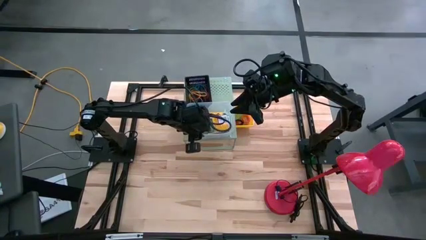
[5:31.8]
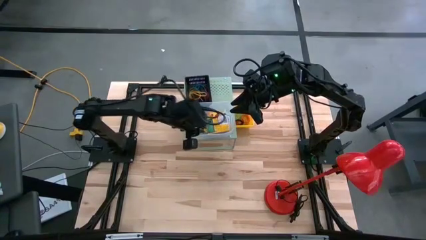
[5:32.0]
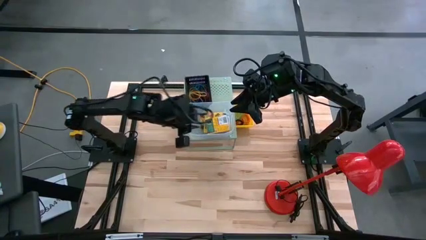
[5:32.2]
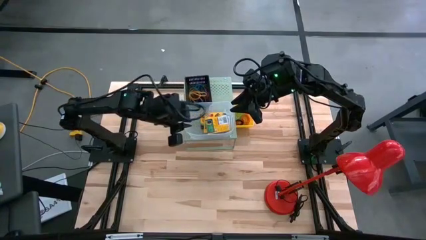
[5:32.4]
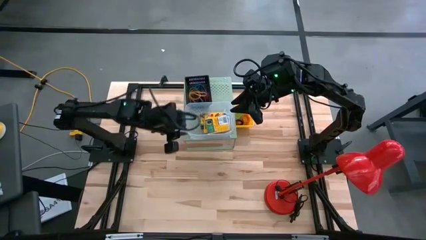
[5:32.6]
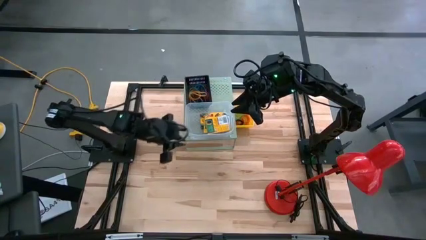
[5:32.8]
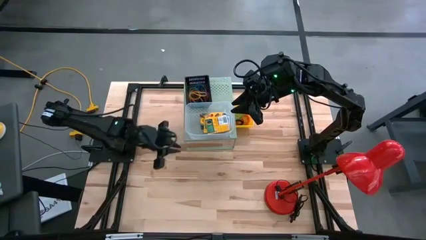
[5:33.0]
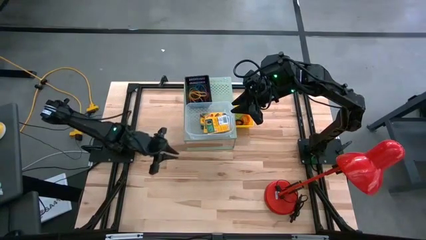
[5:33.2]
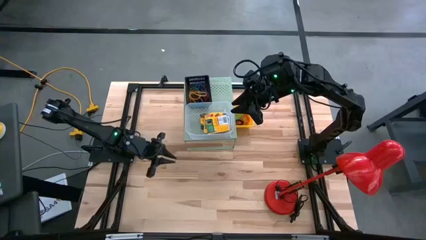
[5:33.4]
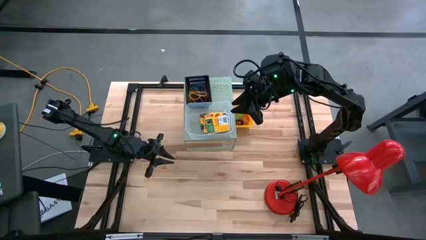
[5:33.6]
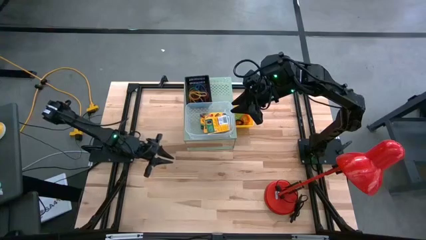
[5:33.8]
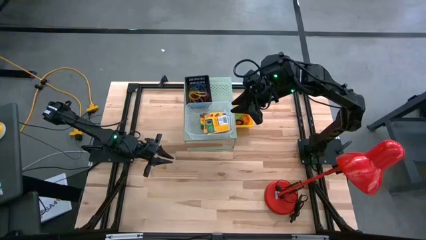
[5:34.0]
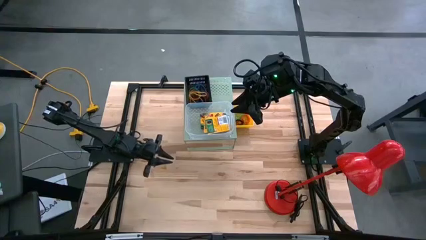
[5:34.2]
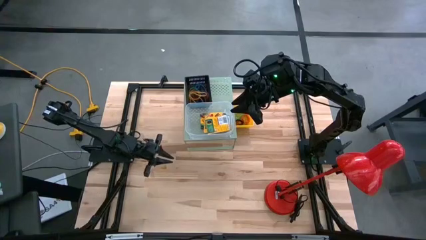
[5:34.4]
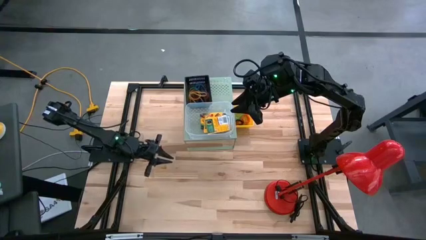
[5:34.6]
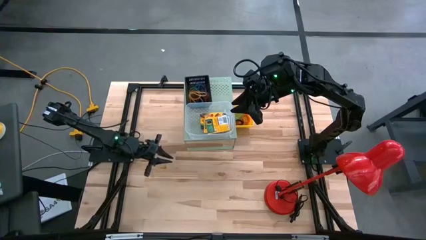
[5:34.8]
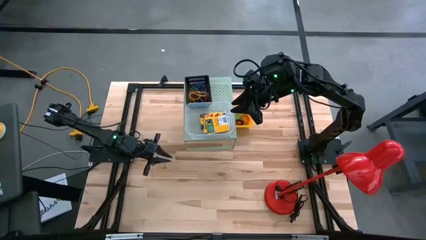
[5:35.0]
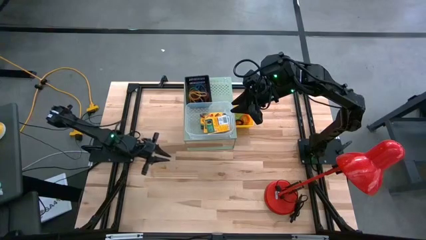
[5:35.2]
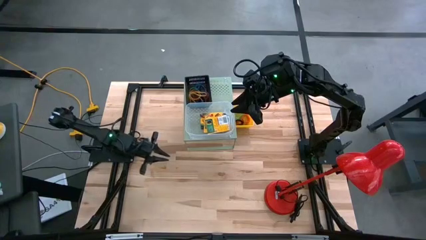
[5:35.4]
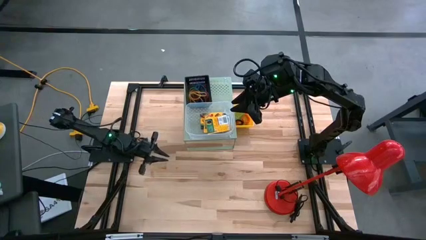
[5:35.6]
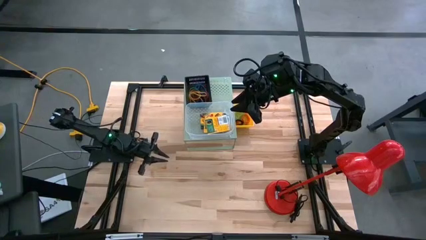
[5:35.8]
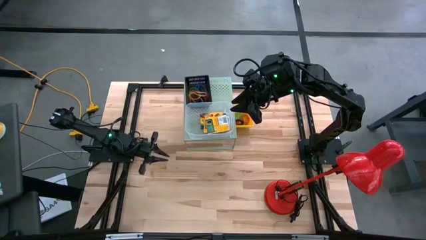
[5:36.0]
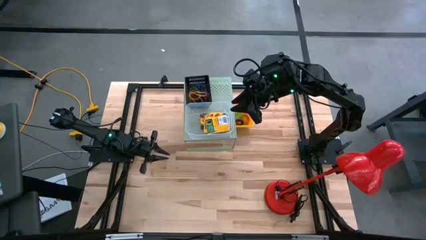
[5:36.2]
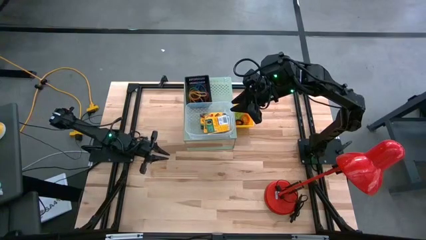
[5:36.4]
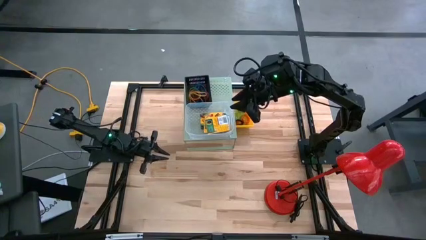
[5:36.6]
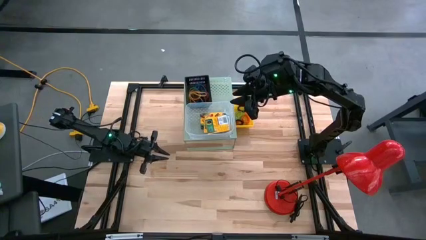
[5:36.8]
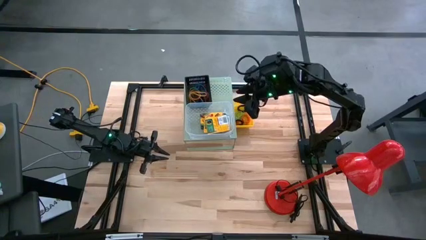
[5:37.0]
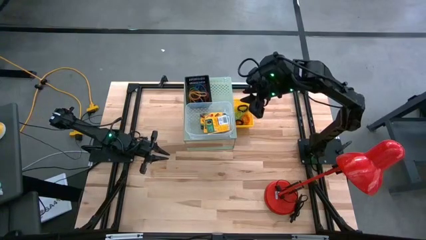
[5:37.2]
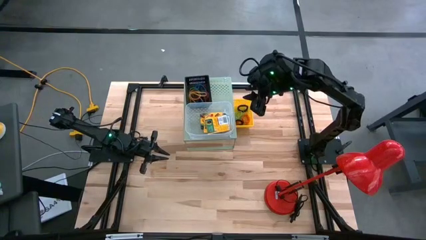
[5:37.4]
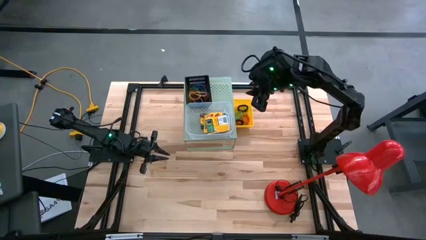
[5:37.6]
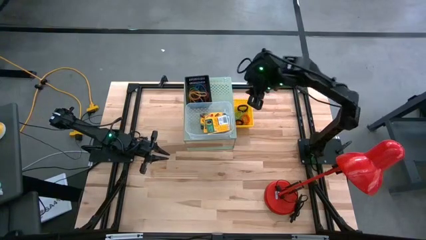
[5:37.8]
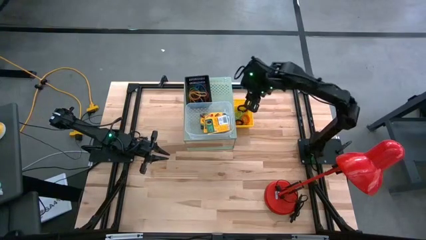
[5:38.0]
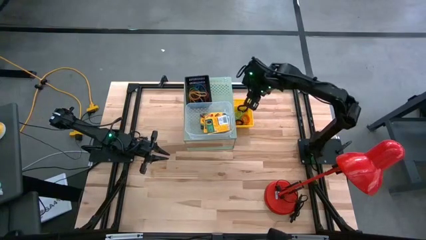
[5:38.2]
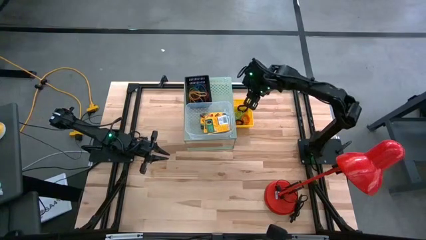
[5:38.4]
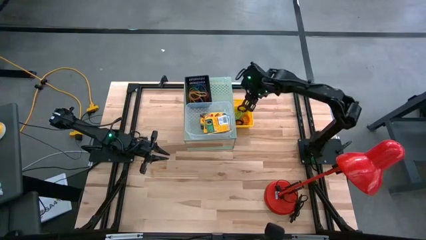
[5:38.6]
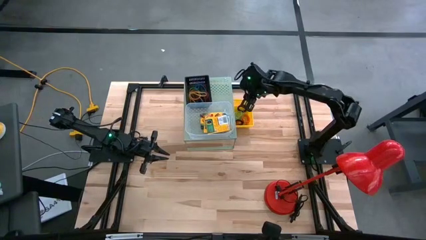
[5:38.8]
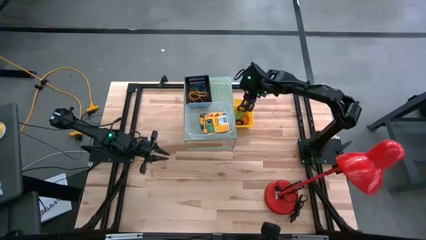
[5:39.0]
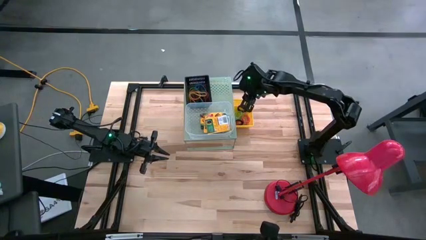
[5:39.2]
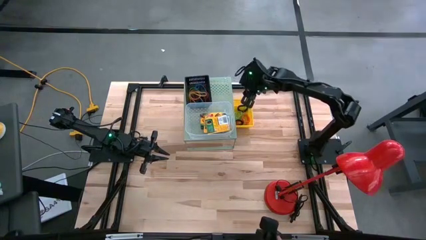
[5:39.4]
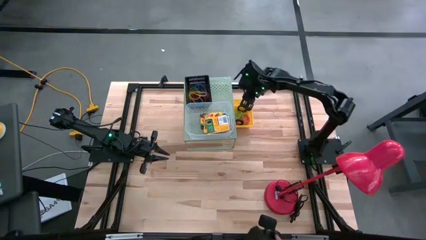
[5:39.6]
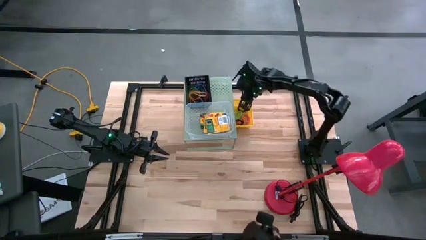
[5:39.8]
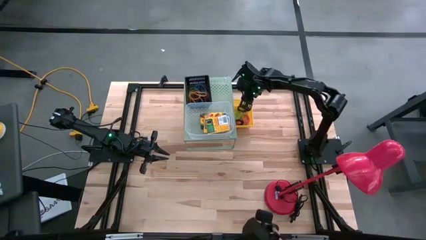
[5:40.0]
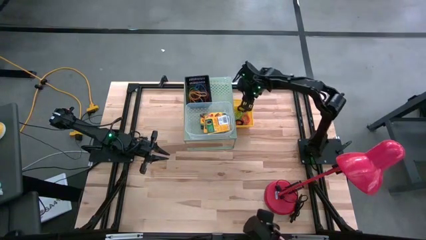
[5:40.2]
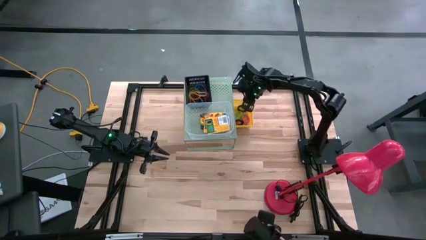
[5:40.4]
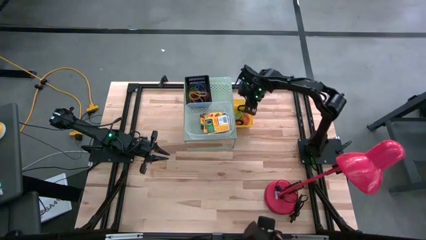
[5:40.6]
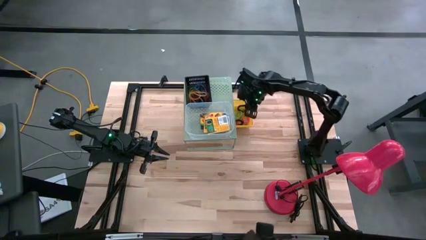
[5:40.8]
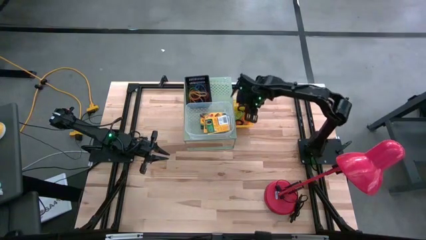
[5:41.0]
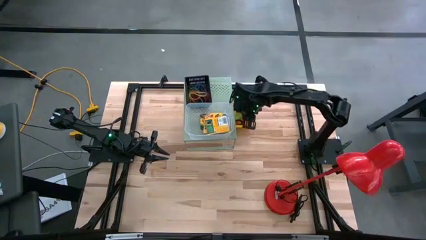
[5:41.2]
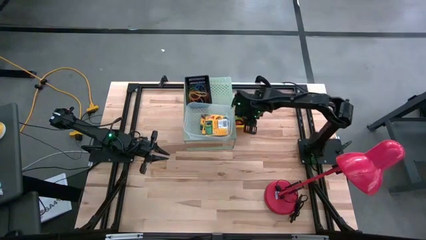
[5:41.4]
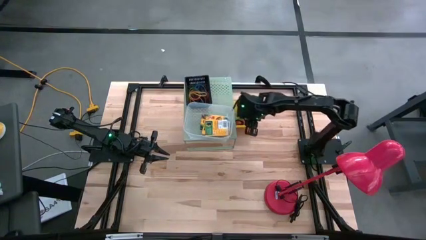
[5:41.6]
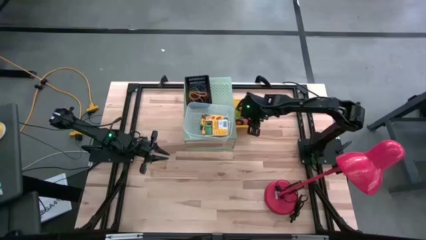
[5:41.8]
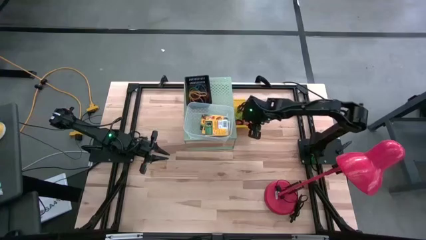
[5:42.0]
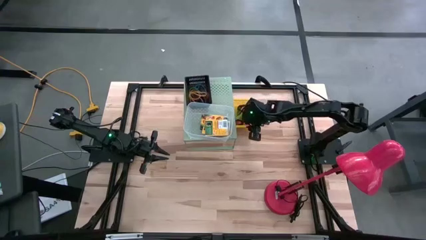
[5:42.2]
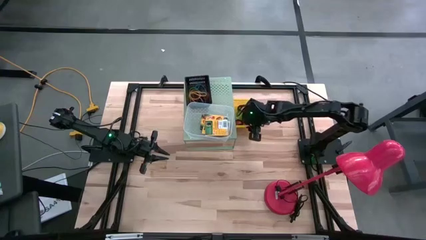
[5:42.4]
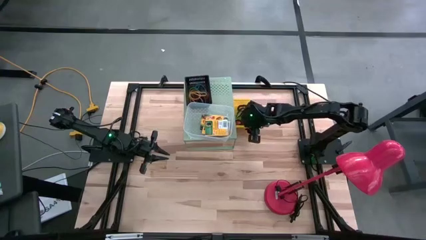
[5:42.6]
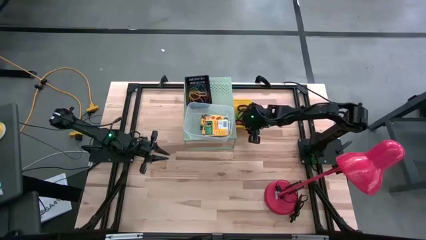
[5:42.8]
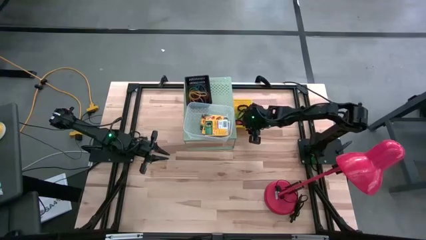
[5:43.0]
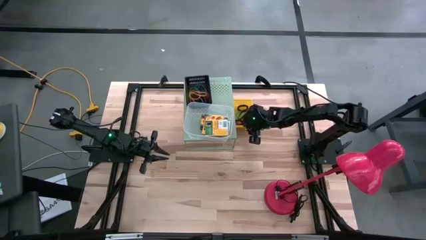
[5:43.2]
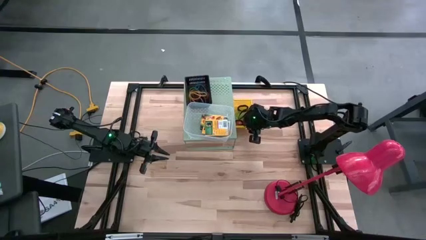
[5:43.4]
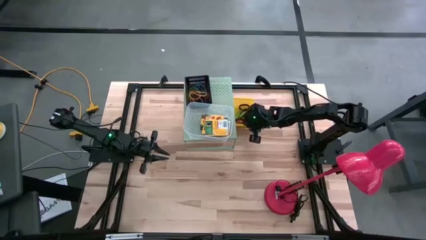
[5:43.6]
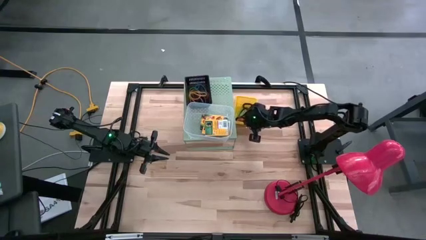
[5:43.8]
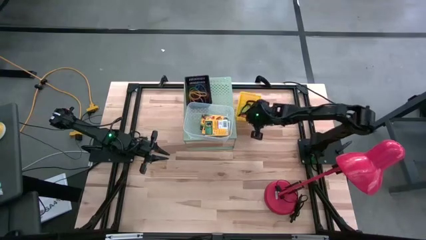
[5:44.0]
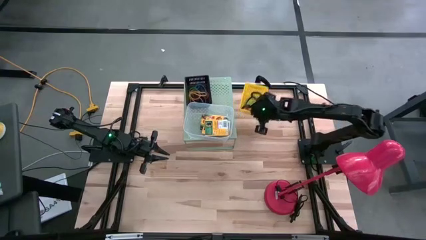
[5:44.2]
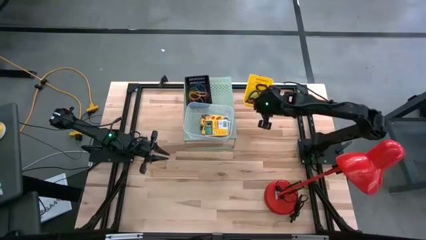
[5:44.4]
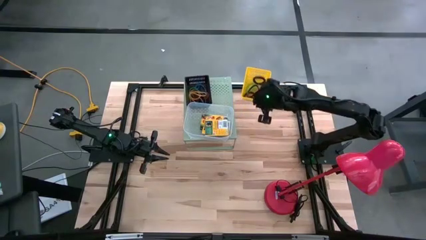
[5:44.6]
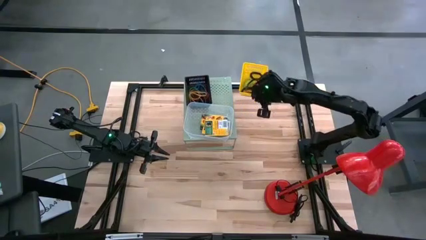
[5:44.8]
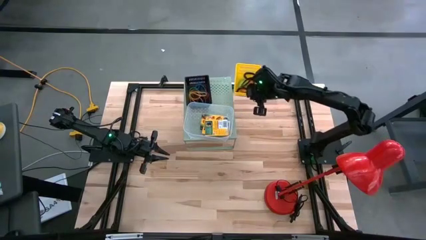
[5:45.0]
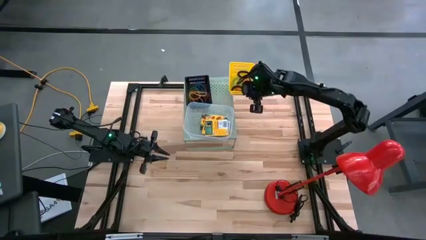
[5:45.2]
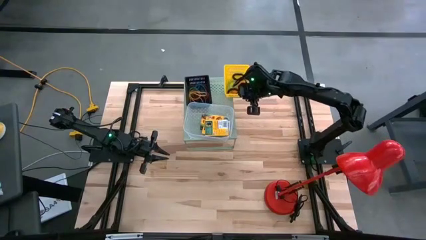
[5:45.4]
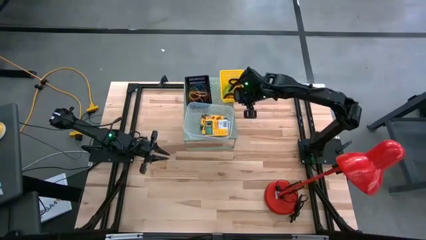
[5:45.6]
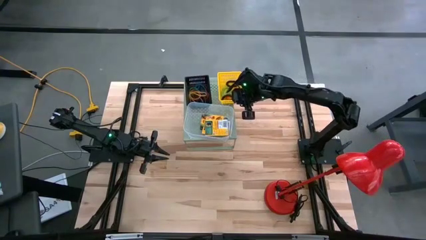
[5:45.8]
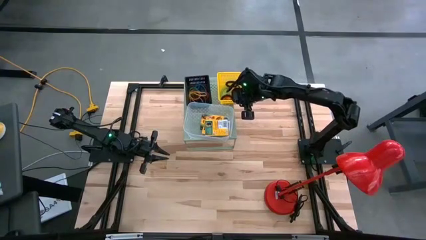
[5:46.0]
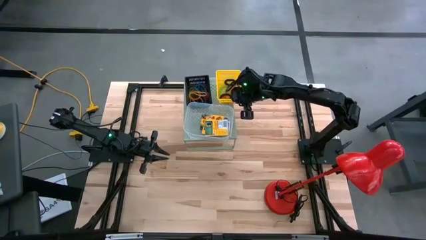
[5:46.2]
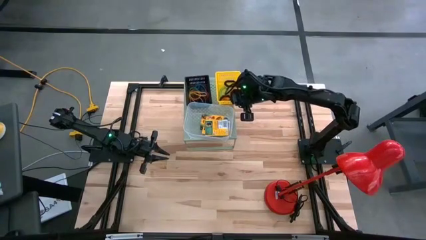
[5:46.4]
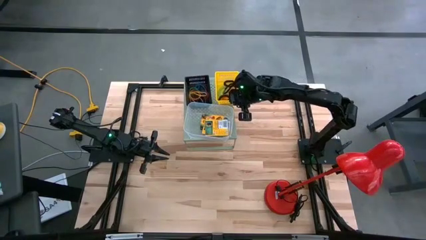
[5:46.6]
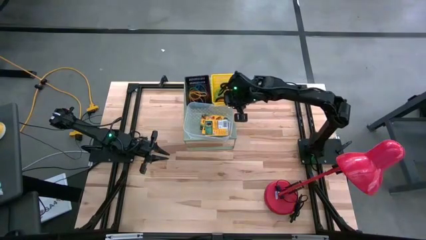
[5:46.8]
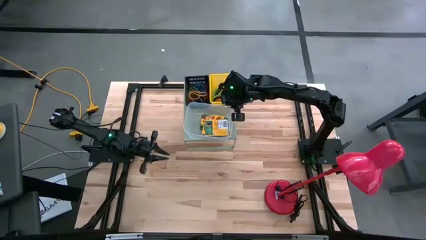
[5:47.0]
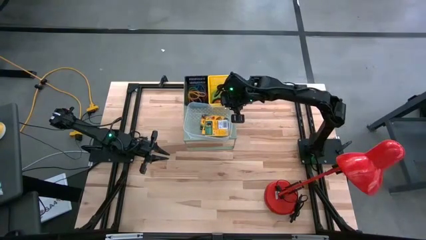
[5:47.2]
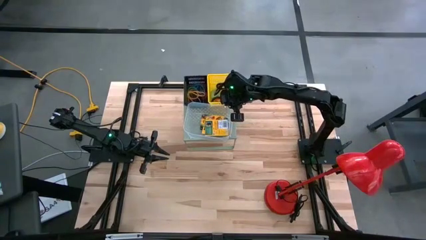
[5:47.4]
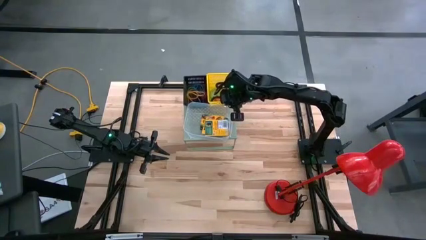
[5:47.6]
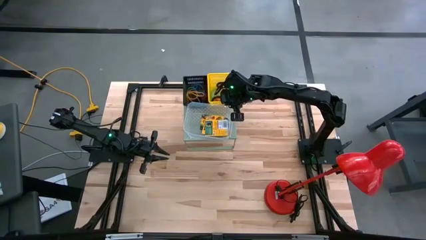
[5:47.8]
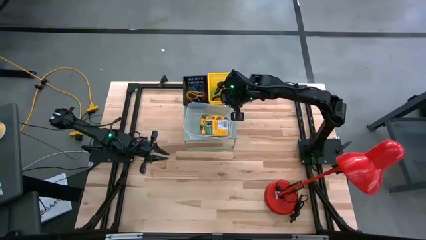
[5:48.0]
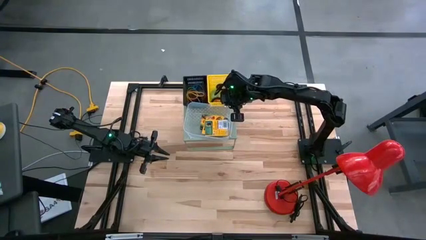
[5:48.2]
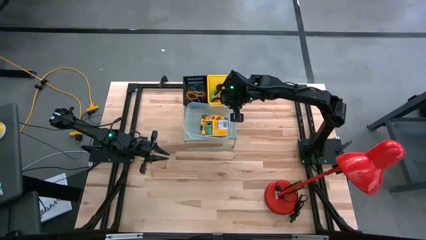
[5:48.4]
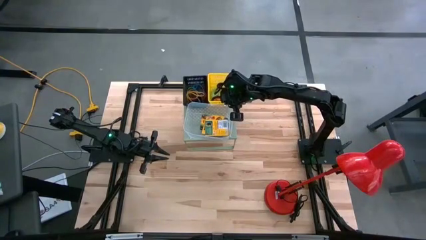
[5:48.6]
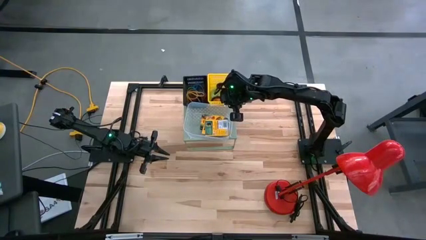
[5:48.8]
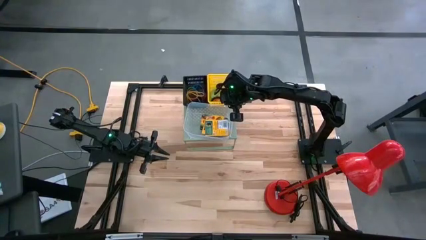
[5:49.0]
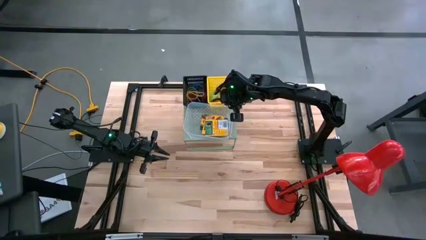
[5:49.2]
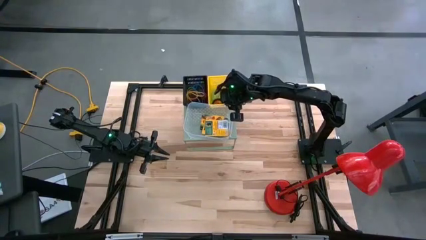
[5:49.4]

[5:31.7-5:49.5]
Task: Pick & Place Office Desk Supplies
Put the yellow bin with sorted spring keychains on the shelf
